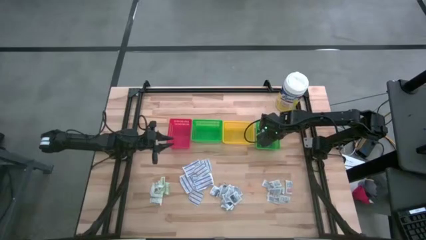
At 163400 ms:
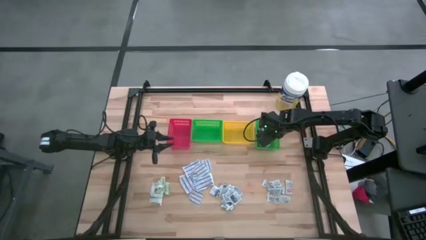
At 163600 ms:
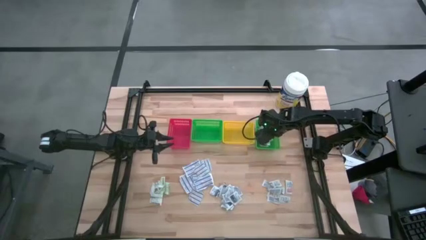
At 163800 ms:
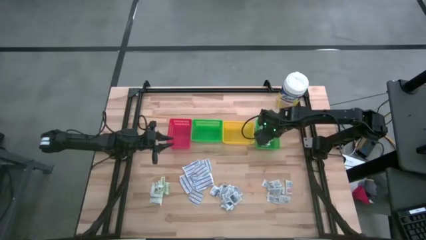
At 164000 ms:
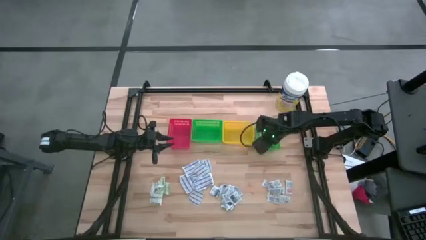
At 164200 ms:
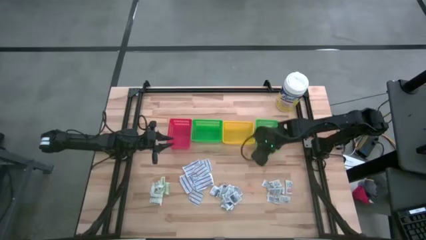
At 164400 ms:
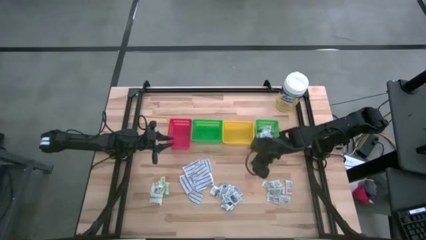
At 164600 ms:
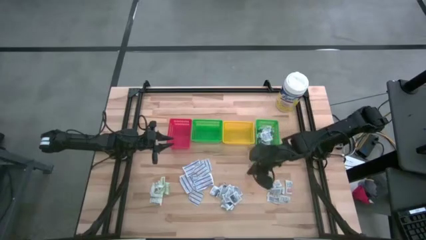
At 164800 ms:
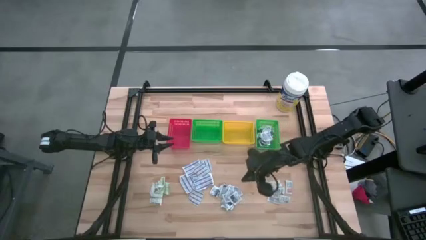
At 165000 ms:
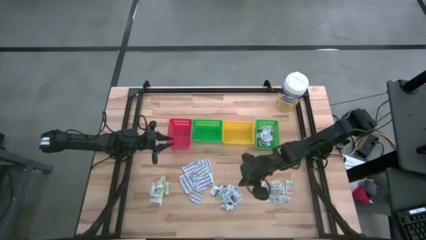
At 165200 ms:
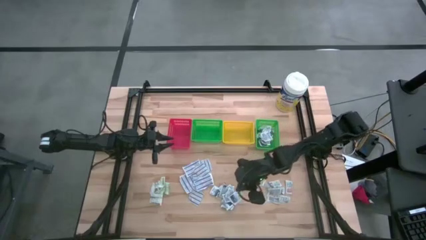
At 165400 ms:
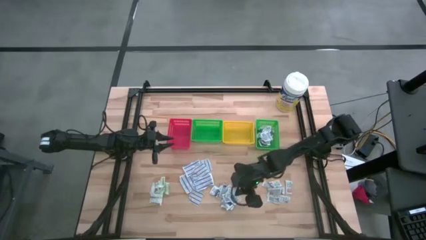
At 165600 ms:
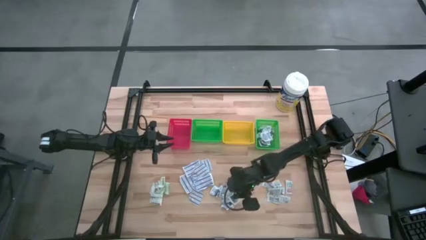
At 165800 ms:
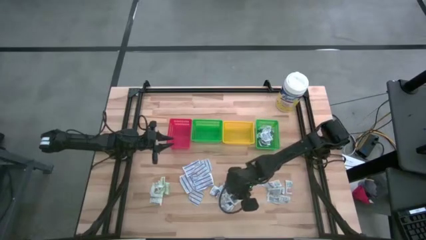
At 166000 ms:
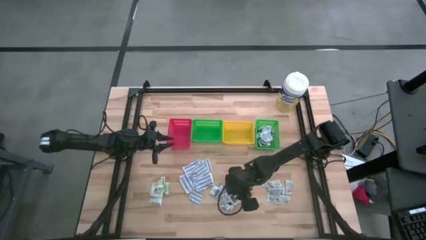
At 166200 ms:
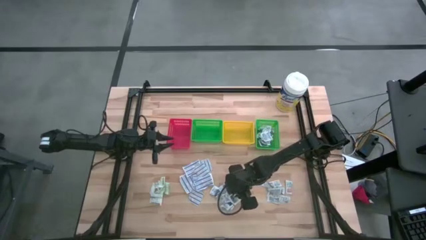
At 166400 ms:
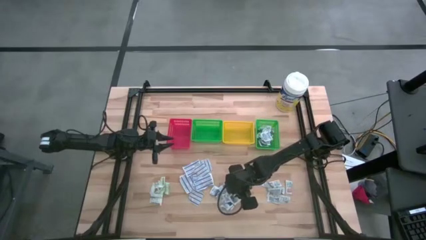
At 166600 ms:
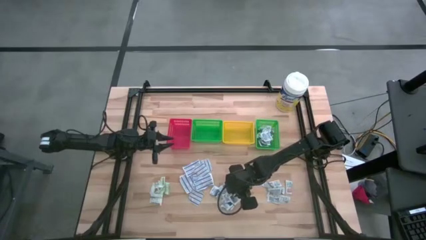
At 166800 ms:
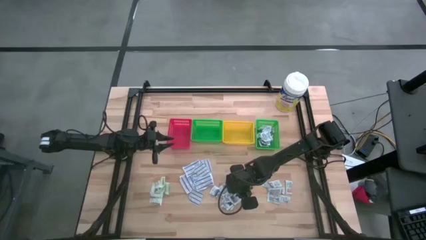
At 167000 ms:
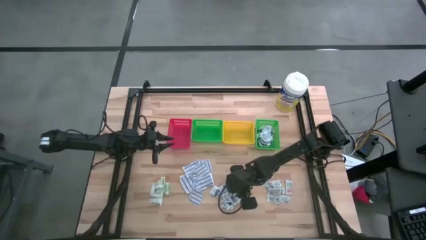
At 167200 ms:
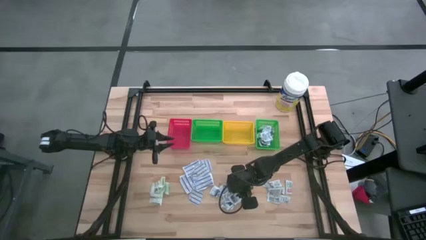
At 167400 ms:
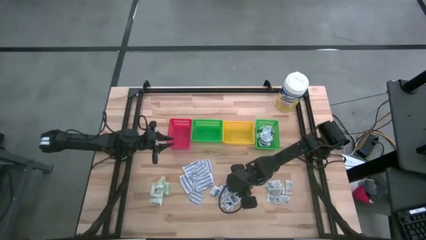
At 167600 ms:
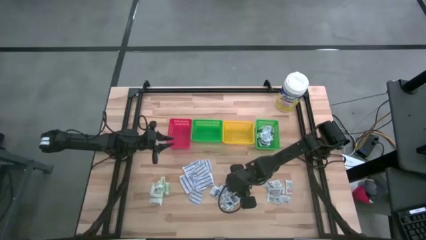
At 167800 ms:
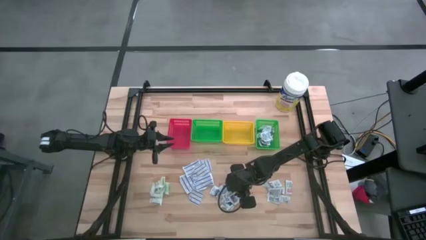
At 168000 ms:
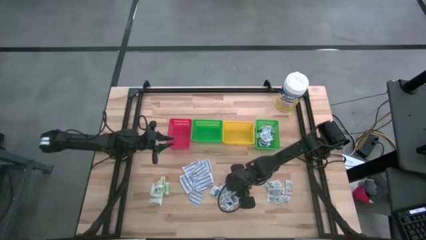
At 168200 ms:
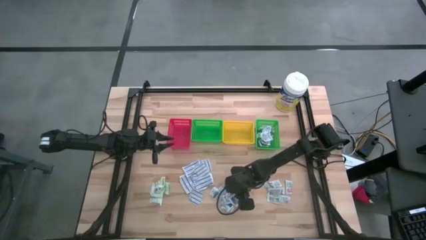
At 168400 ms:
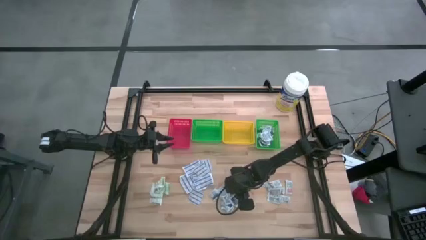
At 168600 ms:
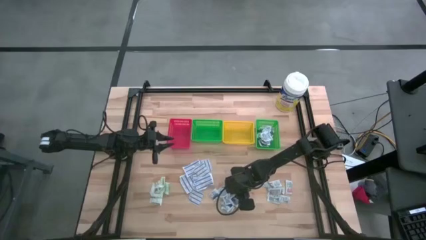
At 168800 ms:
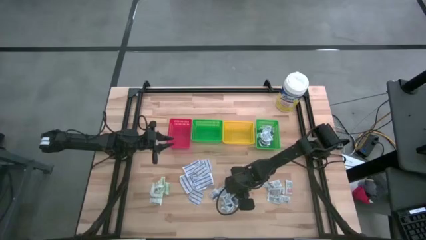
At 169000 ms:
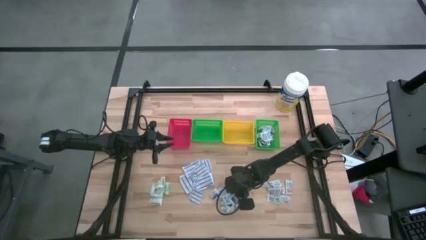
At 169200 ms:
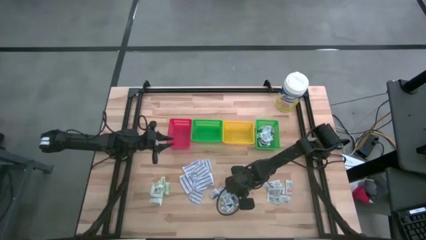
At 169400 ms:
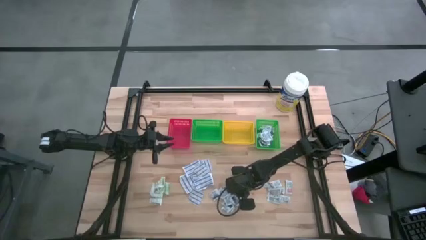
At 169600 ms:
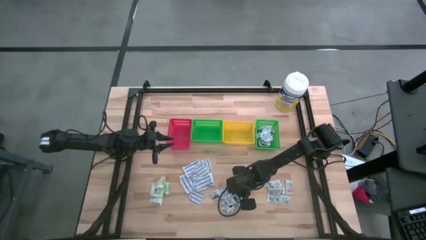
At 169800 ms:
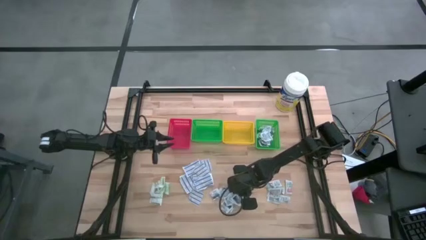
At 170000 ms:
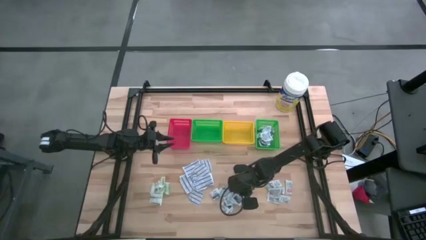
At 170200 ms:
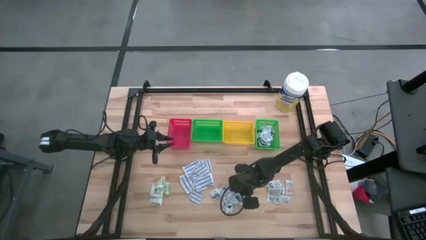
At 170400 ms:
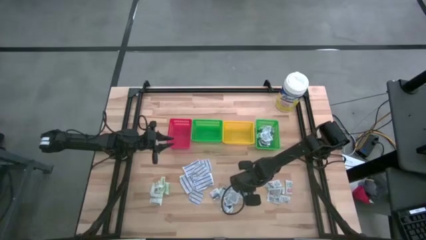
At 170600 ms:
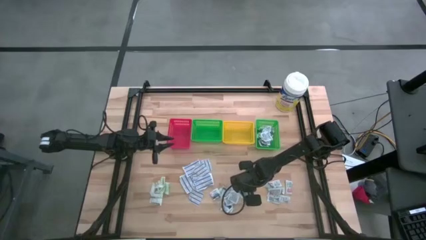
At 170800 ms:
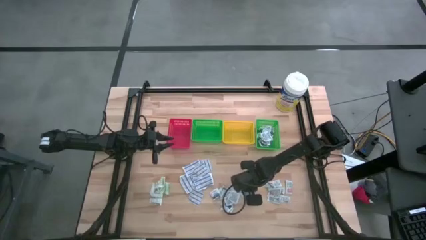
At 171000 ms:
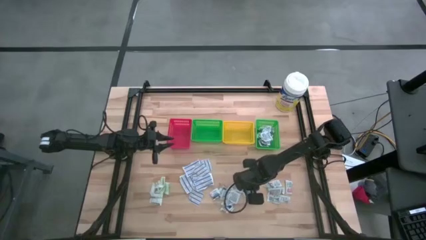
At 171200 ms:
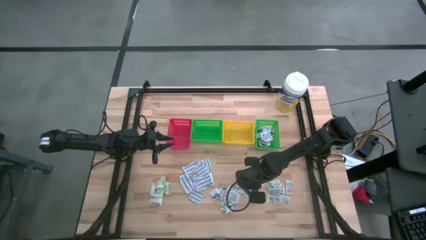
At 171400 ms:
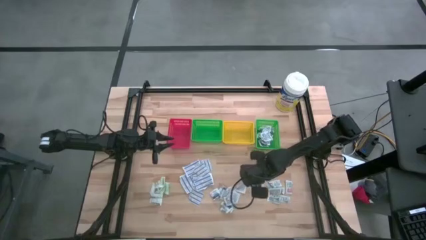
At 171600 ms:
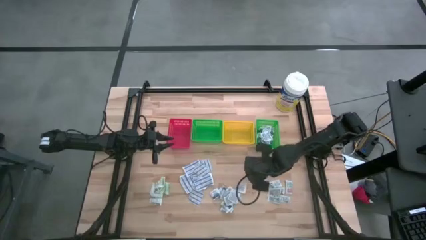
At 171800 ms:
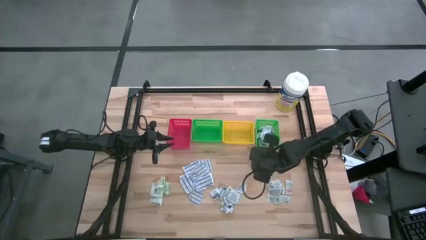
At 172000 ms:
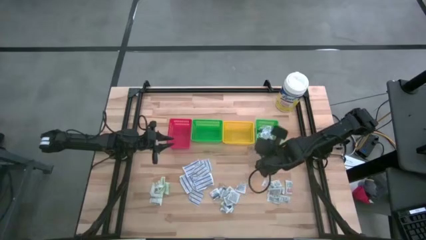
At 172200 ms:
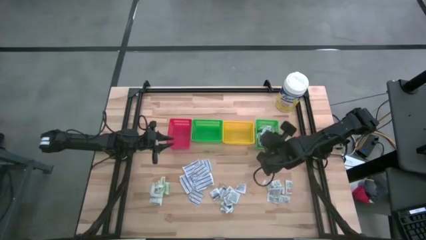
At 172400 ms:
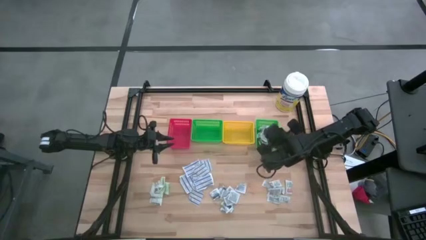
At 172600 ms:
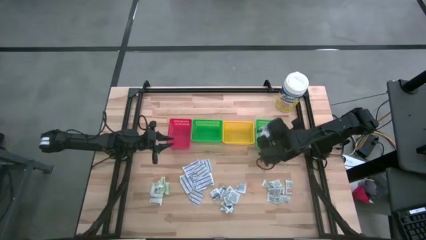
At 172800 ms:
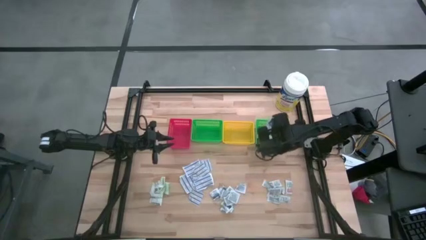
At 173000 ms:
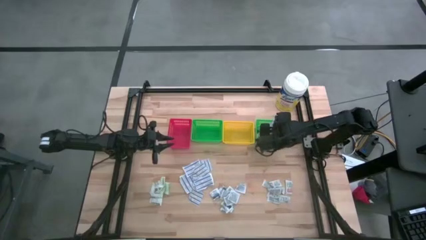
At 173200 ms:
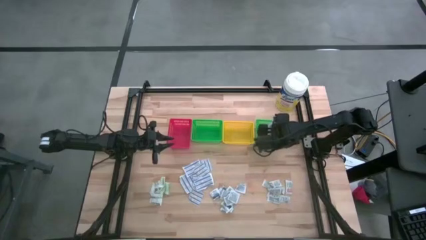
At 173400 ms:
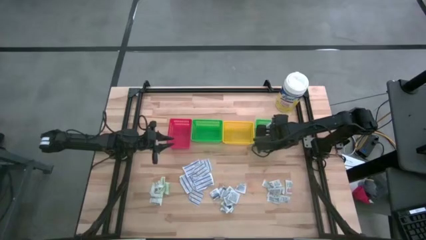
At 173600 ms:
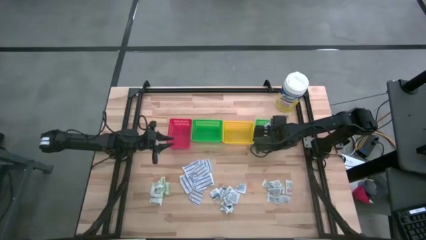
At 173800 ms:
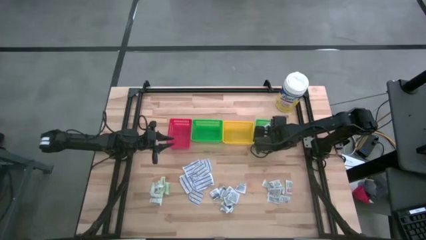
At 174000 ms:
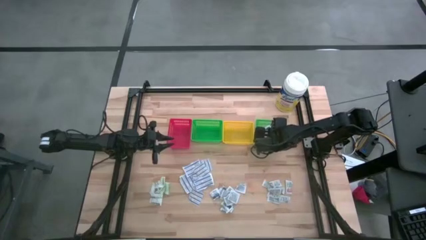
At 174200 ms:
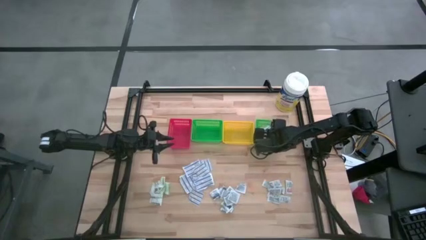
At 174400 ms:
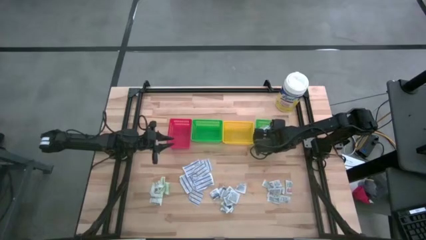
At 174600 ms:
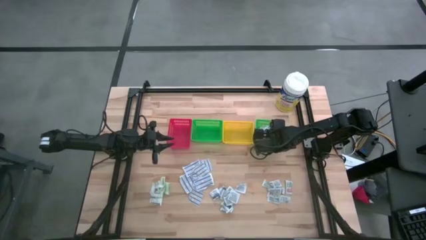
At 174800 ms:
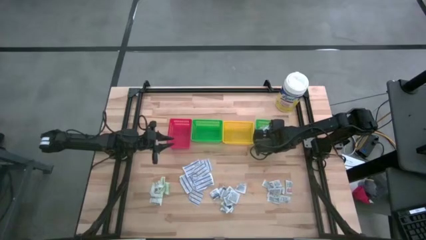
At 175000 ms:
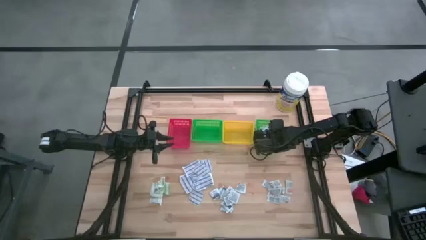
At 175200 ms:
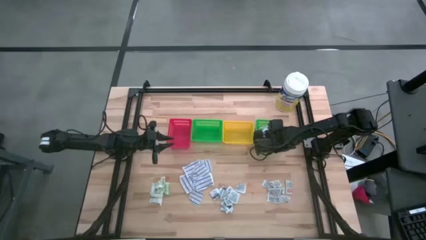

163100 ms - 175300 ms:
Task: Pick & Place First Aid Supplies
Put the blue alcohol pad into the right green bin

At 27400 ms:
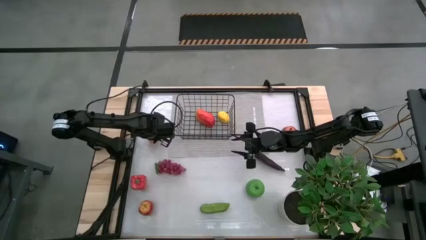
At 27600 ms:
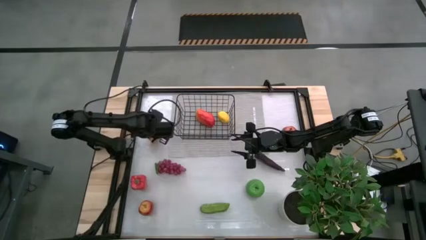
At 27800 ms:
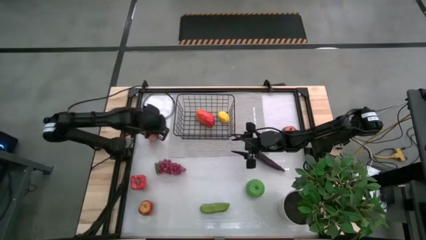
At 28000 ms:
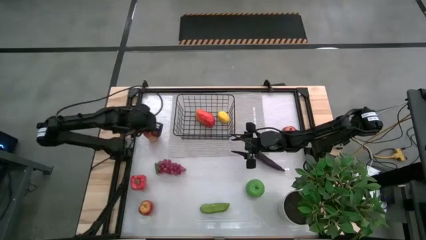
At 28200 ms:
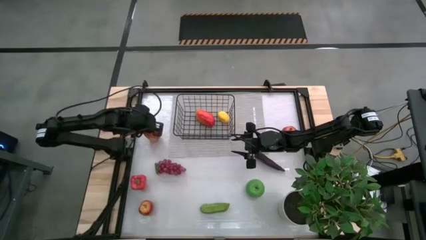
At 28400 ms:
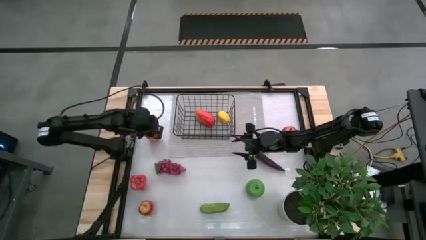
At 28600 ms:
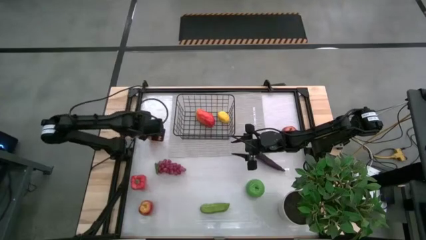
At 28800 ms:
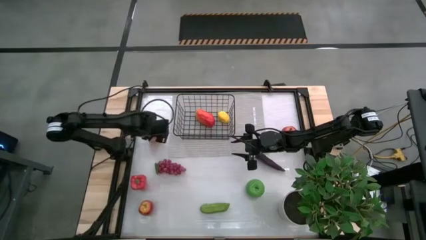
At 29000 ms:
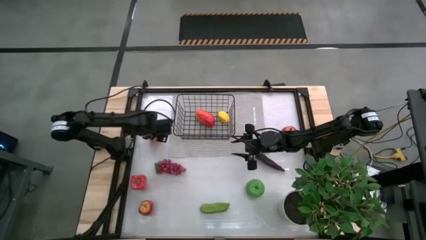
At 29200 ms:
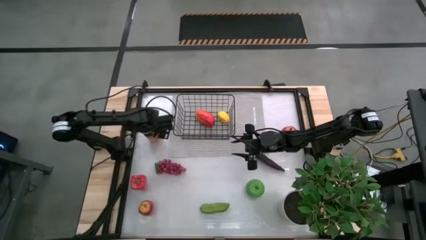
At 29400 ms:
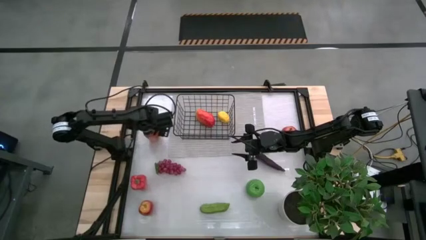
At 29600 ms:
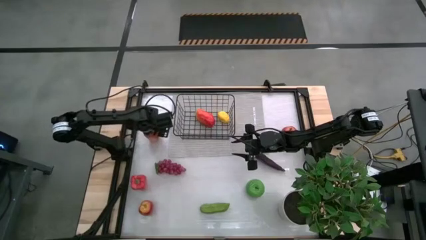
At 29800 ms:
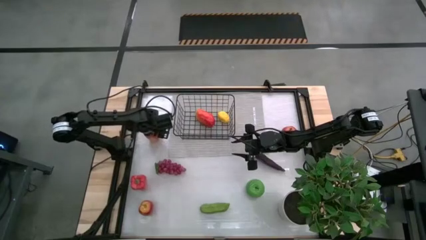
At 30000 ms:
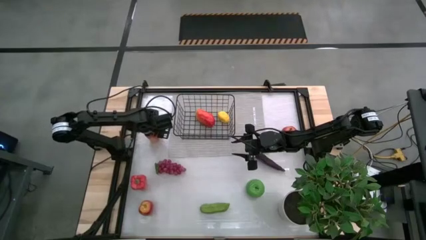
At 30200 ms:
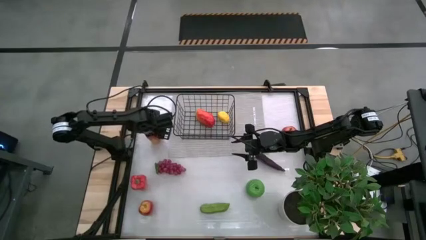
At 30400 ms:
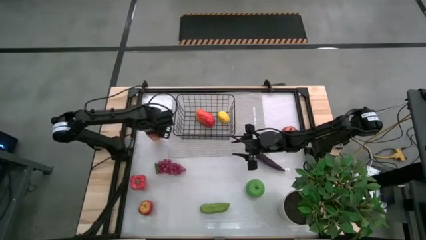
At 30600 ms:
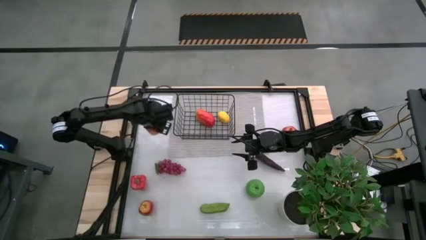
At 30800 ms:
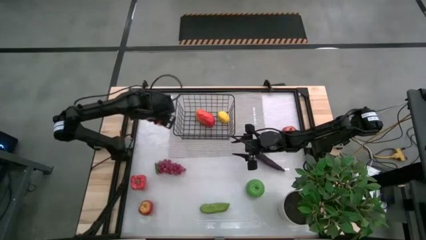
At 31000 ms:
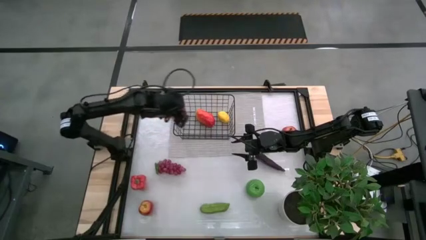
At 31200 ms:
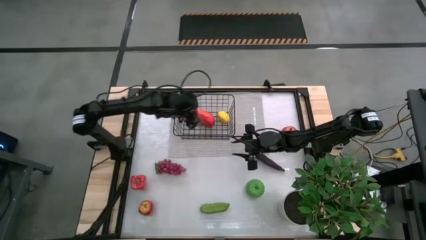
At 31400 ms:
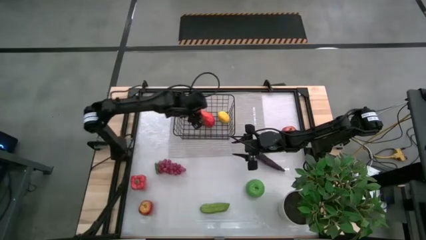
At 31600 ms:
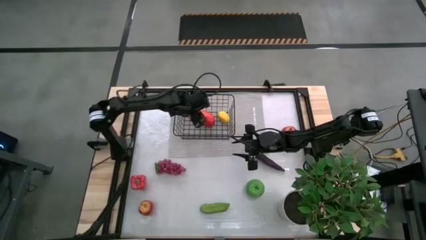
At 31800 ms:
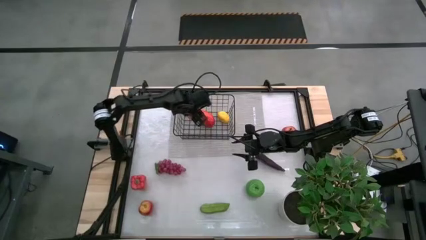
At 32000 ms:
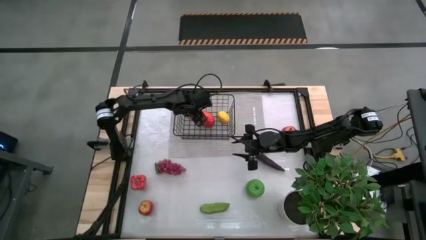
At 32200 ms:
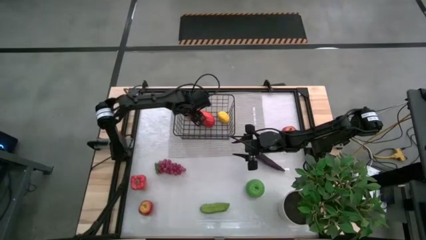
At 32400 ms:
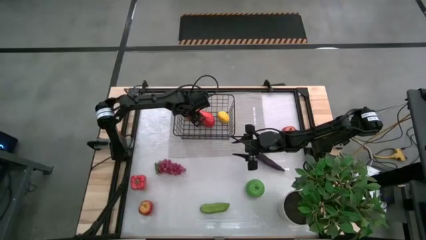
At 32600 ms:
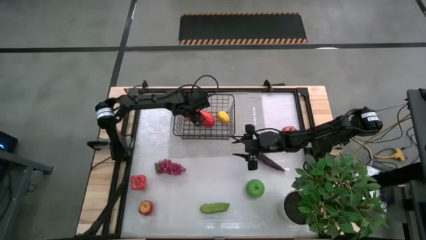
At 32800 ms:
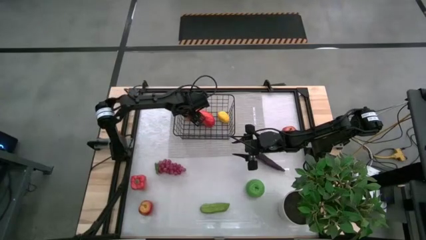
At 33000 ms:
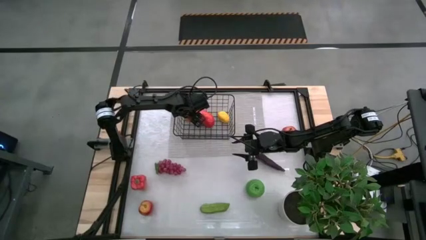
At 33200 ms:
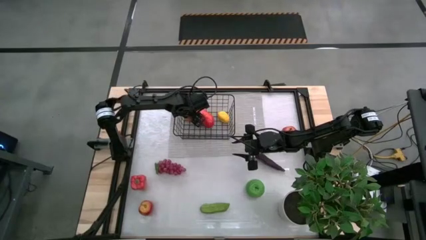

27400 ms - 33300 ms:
Task: Build produce basket
Put the dark red apple into the wire basket
